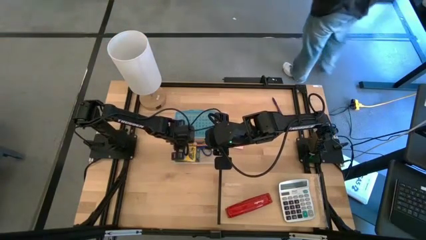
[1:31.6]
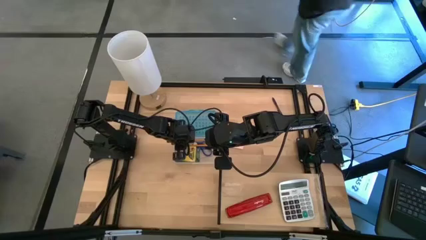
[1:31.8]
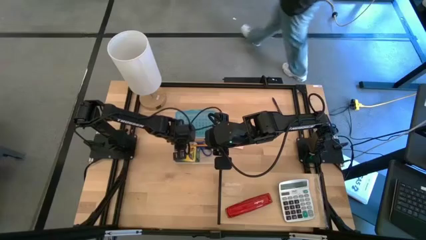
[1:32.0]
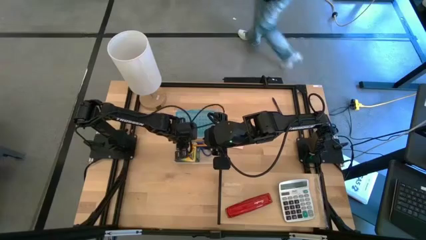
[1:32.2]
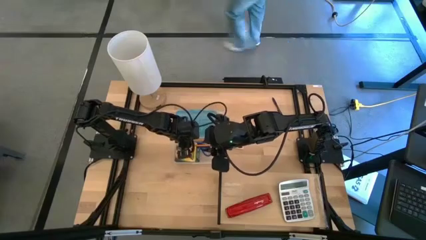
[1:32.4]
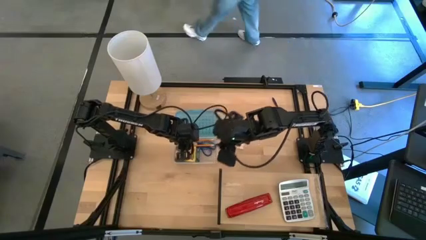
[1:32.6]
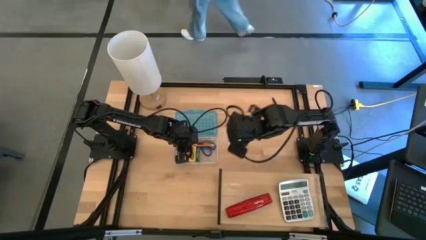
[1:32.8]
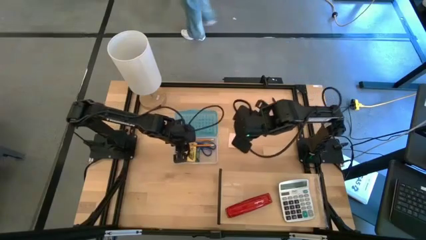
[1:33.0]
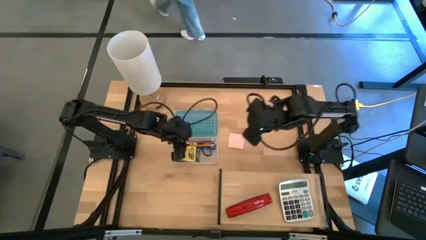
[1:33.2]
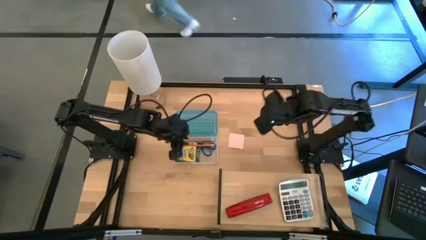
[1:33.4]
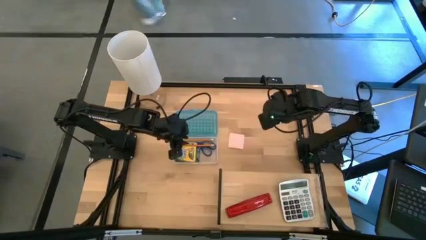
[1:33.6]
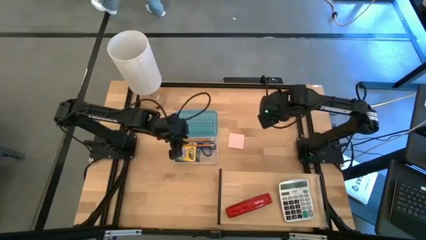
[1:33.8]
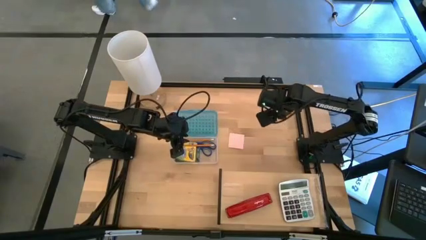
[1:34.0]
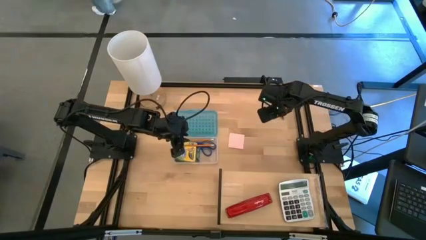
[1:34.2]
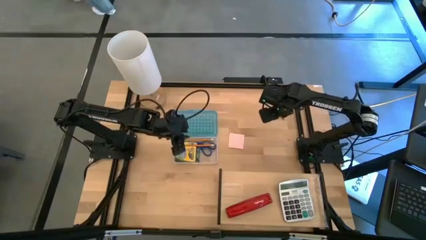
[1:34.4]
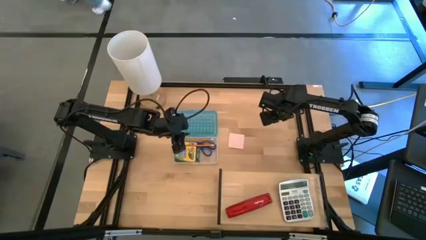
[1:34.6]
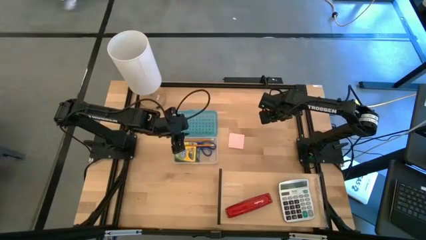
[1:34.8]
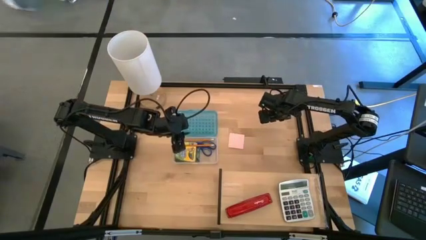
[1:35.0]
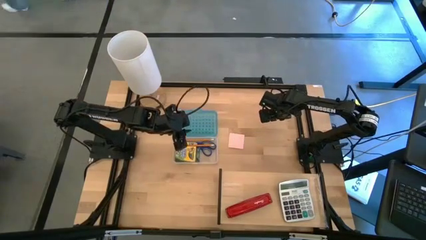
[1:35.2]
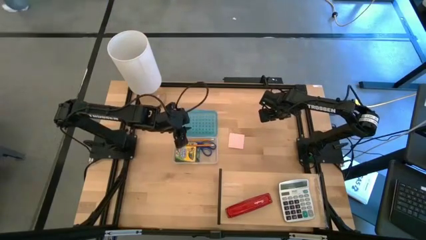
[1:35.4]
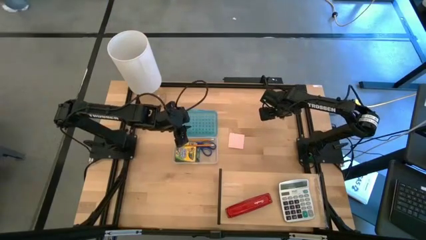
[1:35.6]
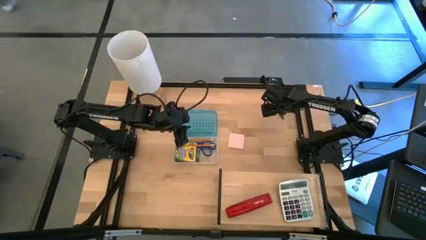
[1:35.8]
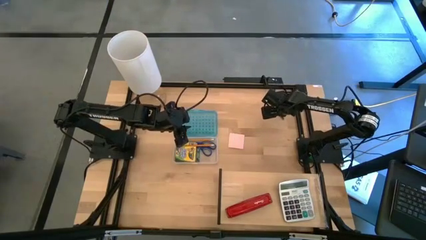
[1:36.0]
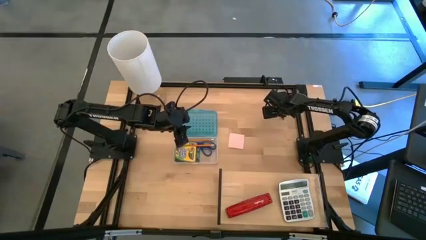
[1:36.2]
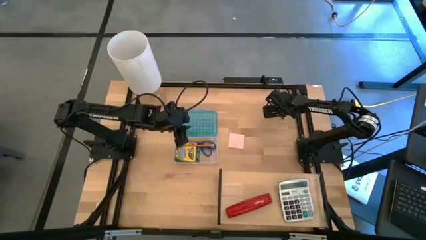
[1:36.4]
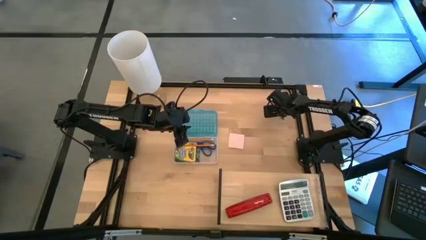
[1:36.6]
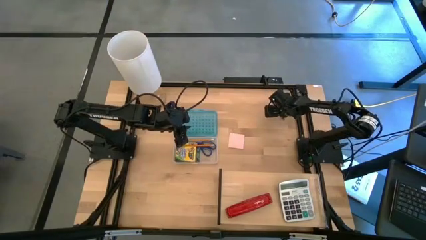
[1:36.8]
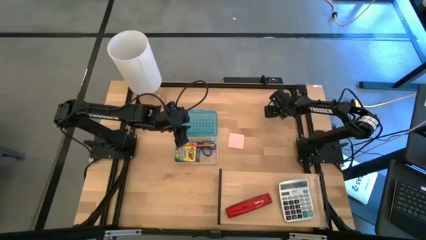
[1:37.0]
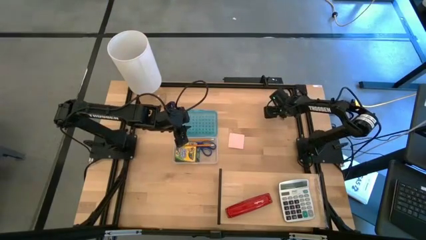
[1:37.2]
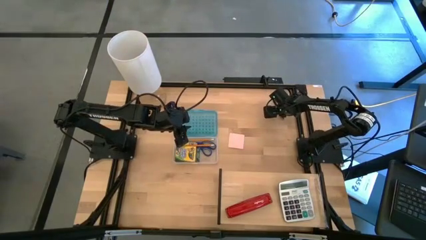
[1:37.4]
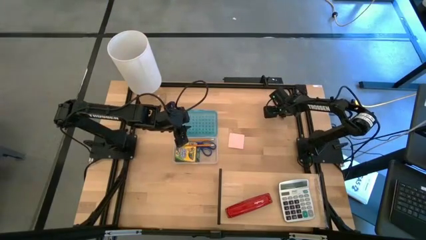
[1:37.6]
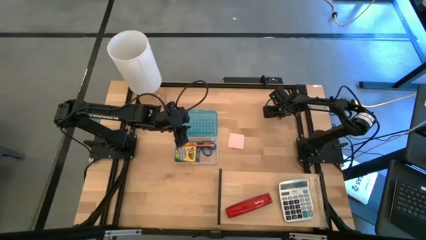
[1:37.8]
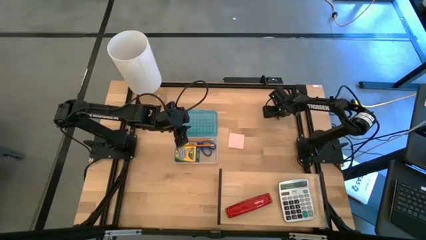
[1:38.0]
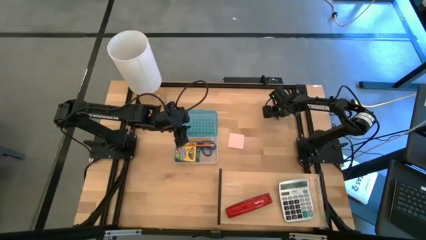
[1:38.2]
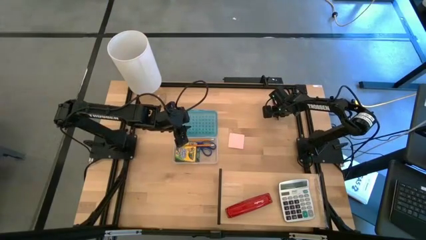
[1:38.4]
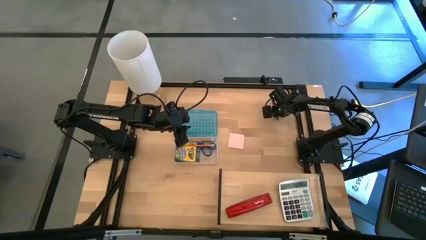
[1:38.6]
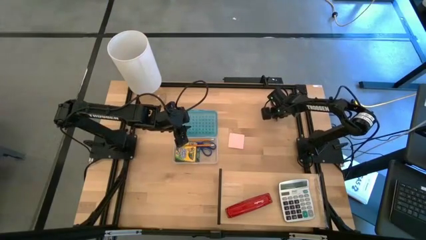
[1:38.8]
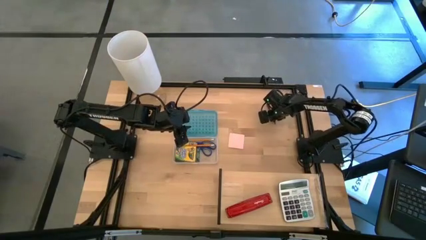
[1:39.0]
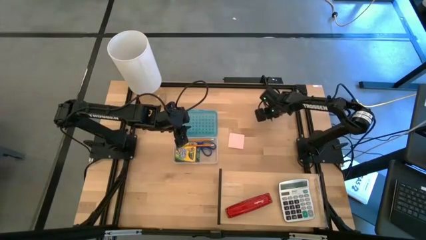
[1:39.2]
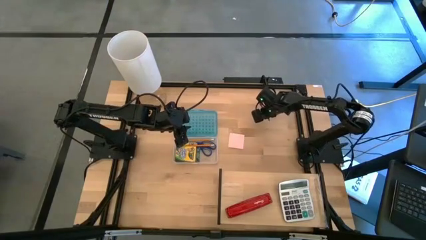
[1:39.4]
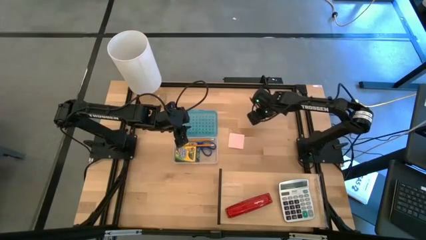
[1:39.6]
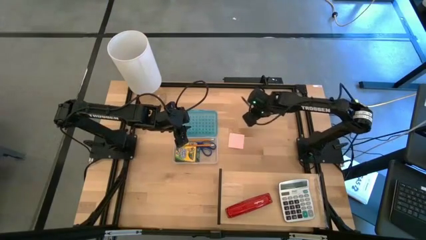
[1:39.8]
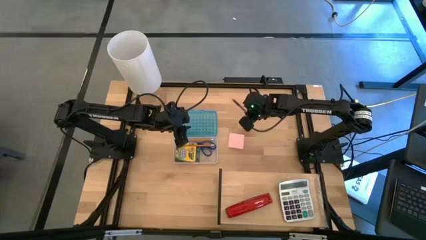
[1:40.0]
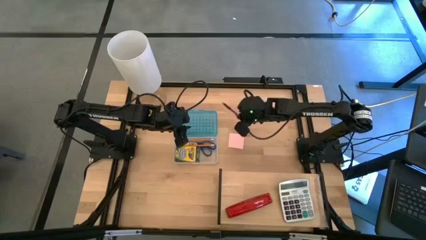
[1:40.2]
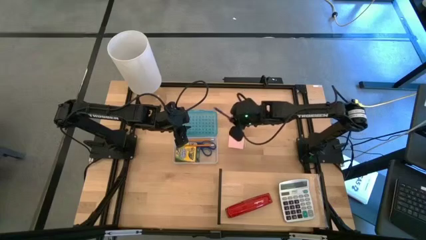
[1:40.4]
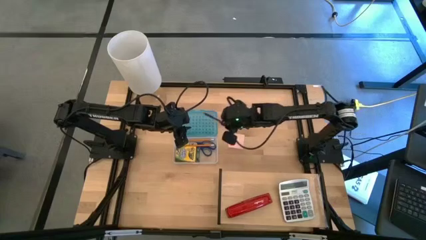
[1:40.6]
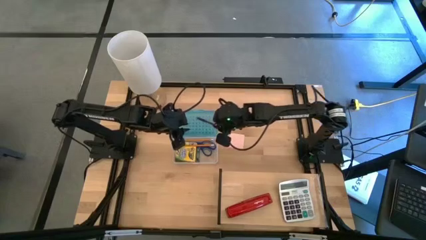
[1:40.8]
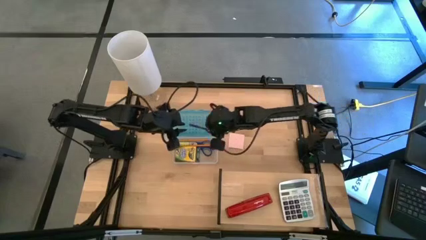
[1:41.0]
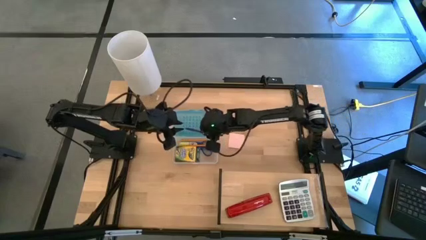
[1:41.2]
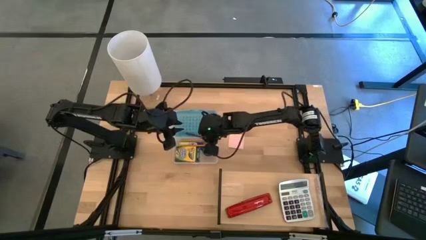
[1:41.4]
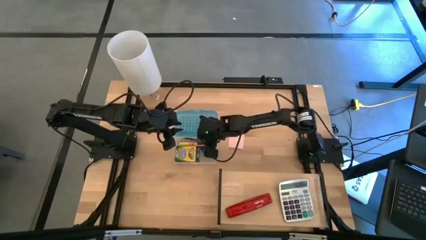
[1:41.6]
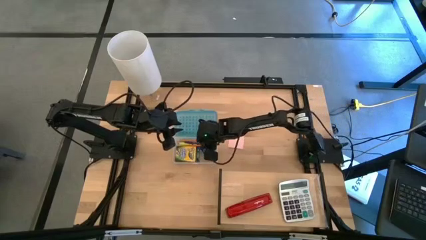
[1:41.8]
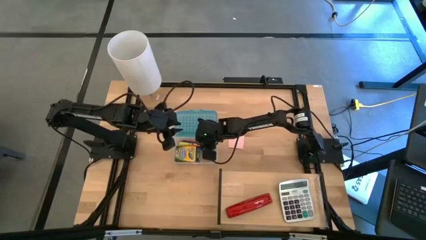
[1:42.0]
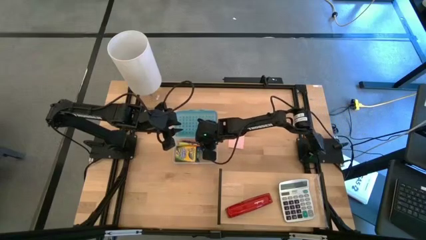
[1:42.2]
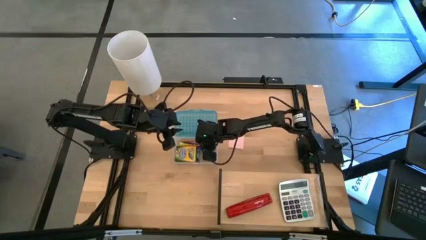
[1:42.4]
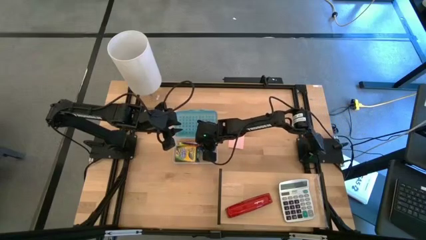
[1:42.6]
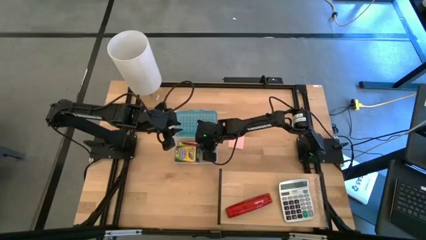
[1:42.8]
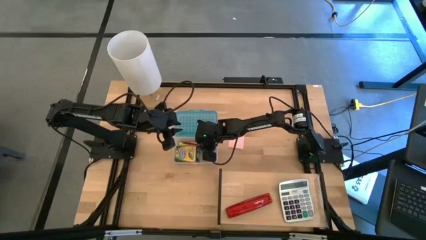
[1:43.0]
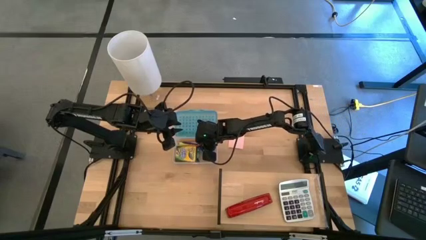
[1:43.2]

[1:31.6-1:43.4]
Task: Pack school essentials
Put the violet pen into the blue supply box

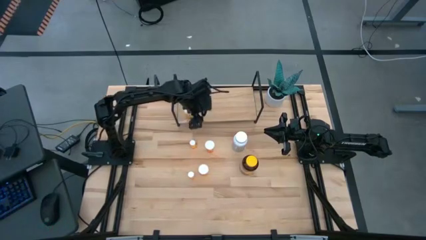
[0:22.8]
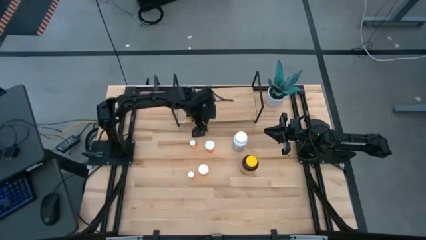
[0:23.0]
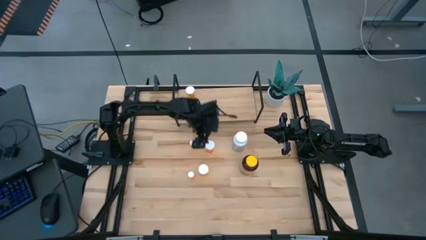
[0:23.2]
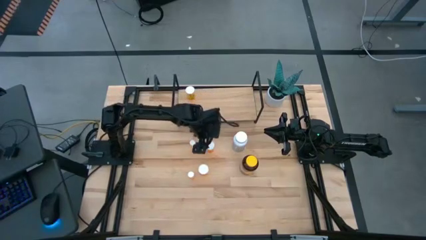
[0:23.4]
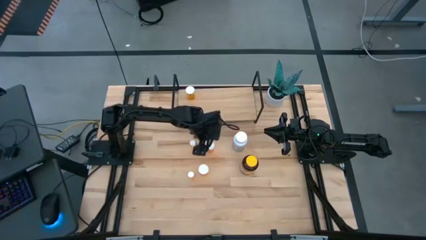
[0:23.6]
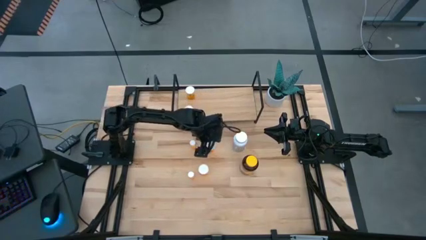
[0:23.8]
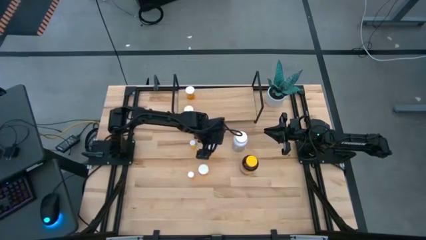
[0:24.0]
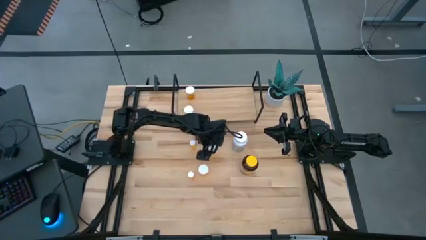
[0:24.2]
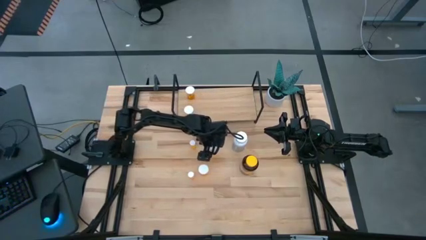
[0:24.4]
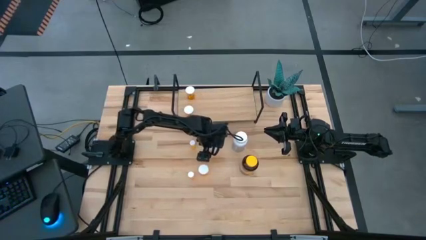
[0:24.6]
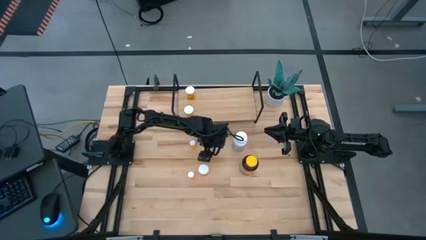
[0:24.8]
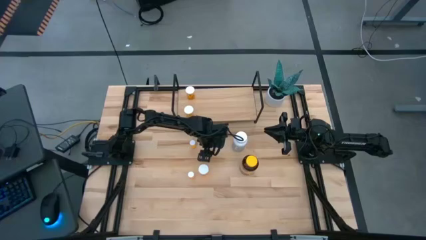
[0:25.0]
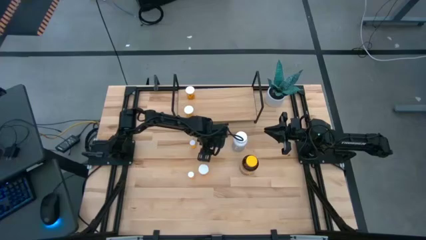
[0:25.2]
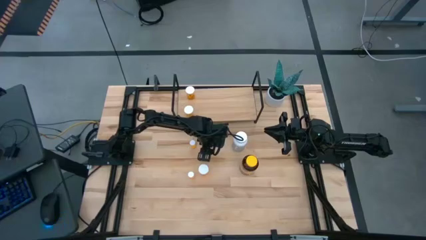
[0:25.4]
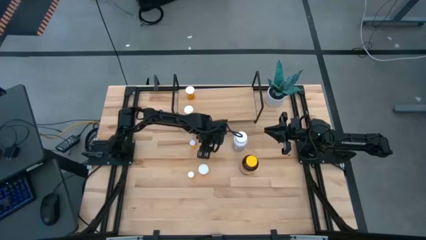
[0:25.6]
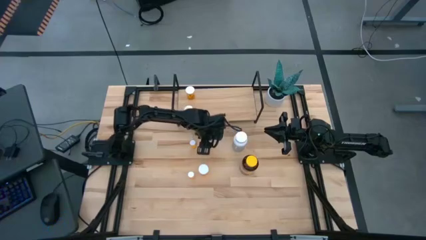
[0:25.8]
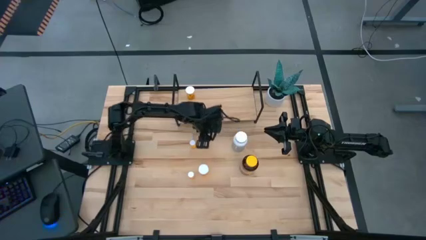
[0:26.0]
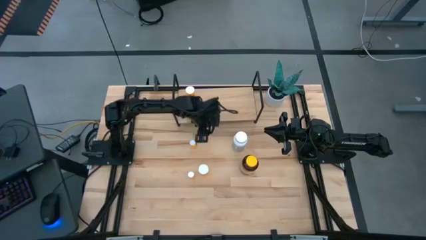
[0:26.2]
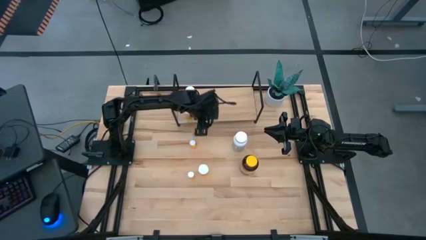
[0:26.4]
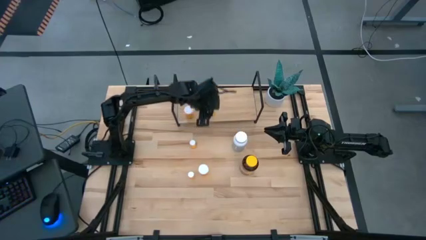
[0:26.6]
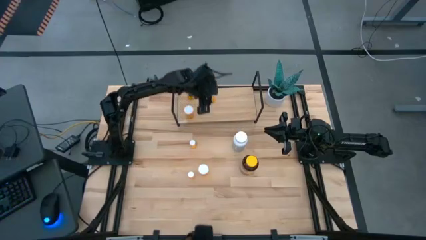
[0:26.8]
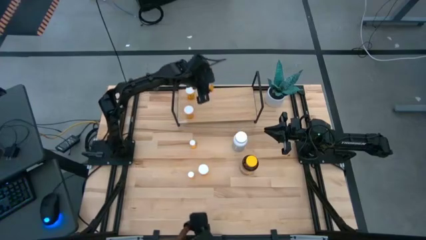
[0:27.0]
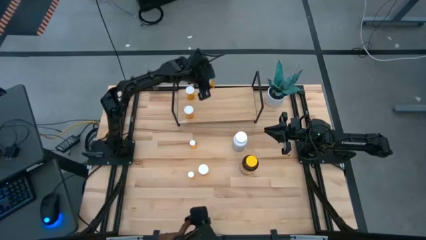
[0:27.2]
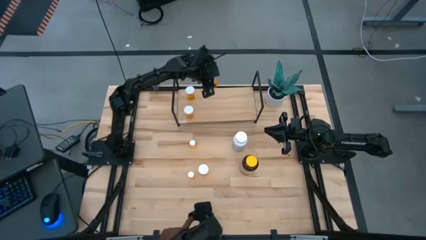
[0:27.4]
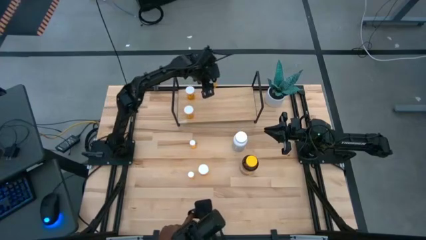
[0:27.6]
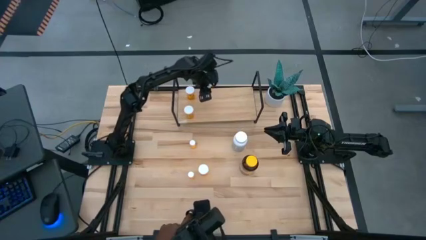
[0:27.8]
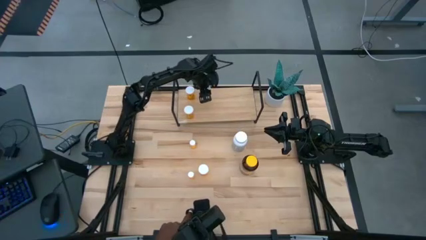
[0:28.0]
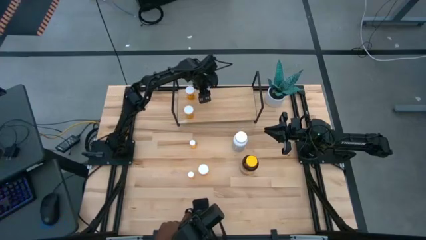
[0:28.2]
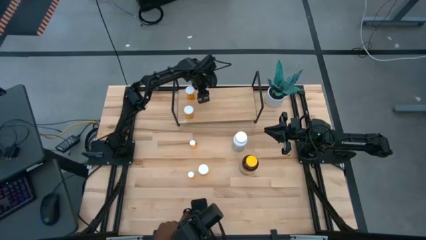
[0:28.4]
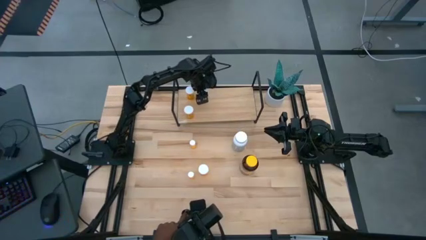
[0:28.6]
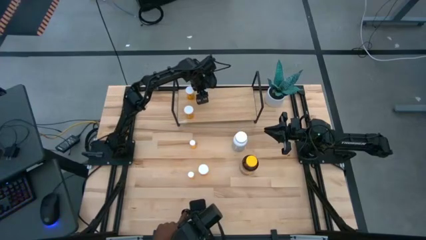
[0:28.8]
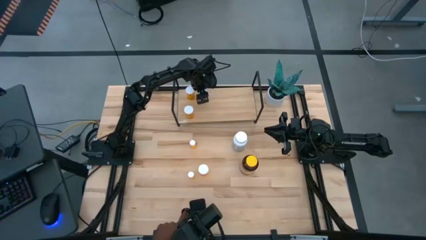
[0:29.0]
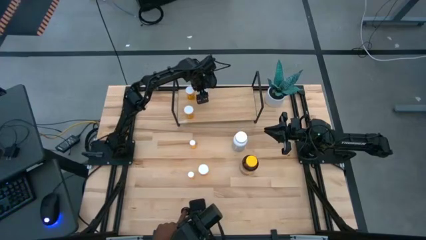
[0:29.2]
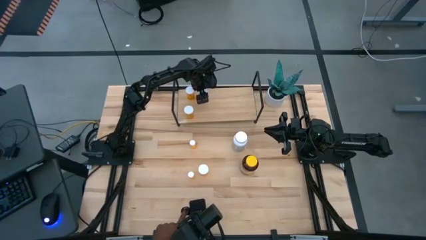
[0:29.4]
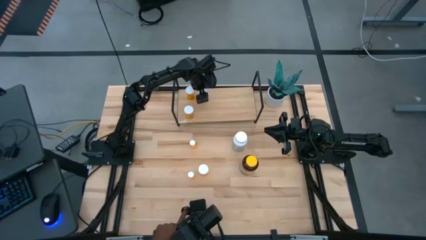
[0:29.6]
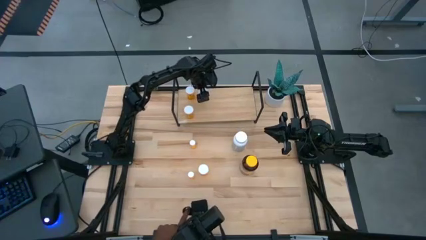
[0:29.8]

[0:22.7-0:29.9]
Task: Pick and place medicine bottles onto shelf by color
Put the top big orange pill bottle on the shelf
